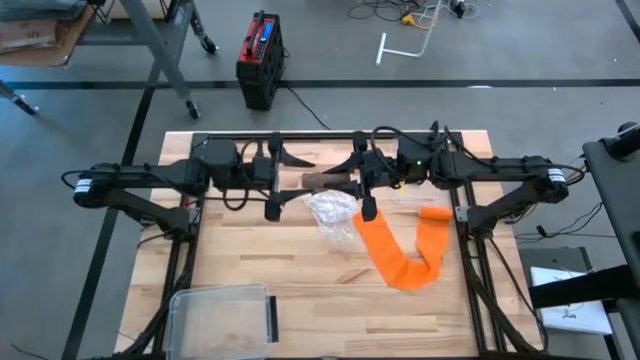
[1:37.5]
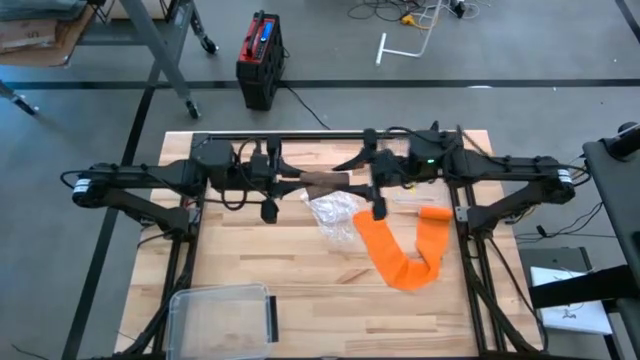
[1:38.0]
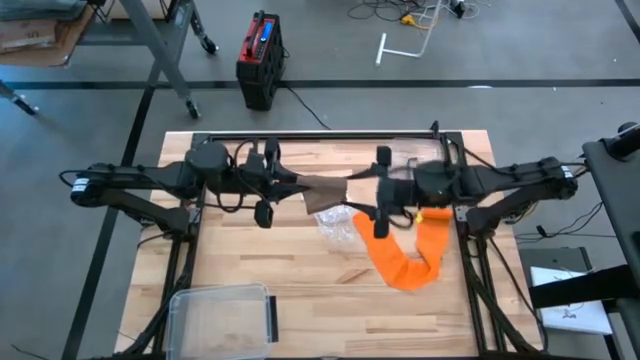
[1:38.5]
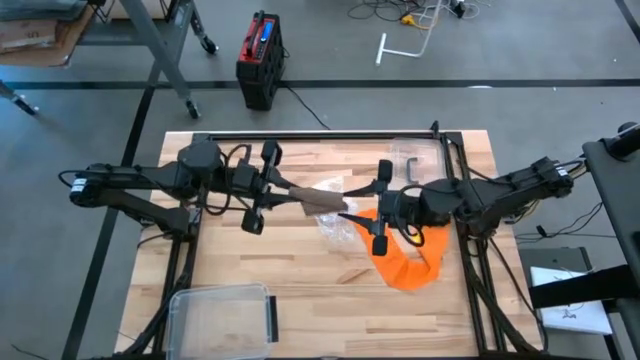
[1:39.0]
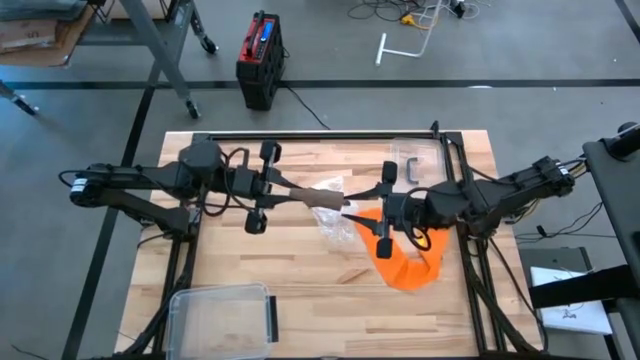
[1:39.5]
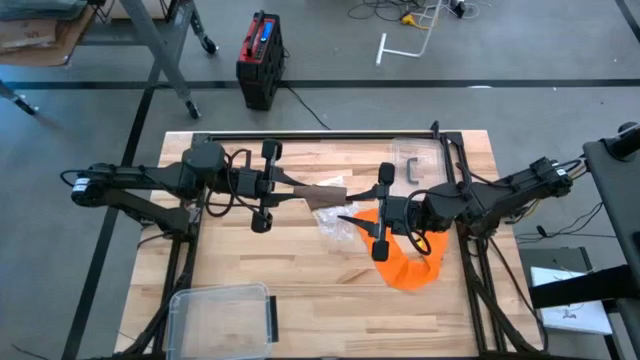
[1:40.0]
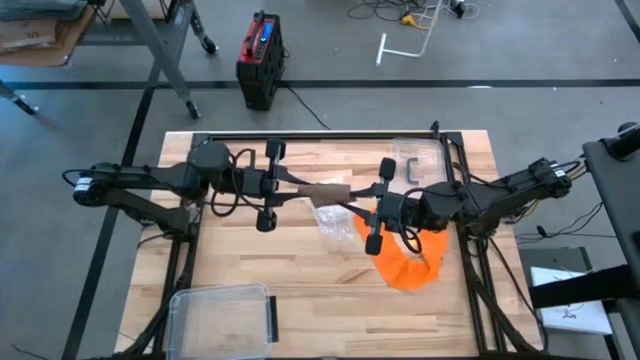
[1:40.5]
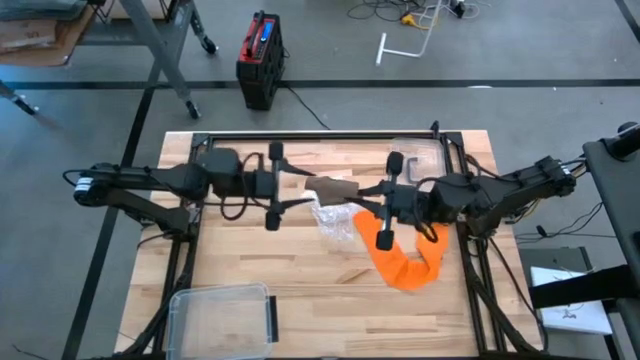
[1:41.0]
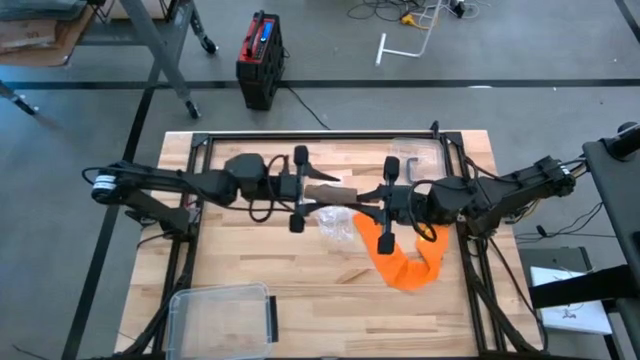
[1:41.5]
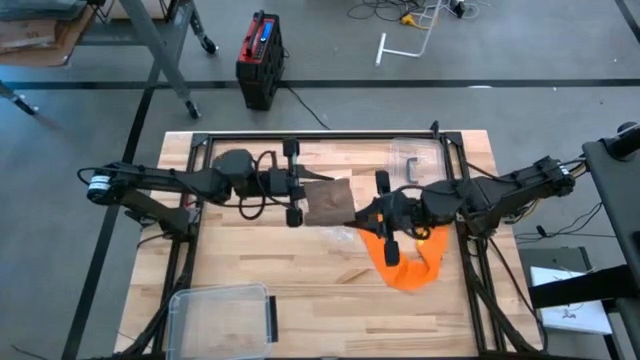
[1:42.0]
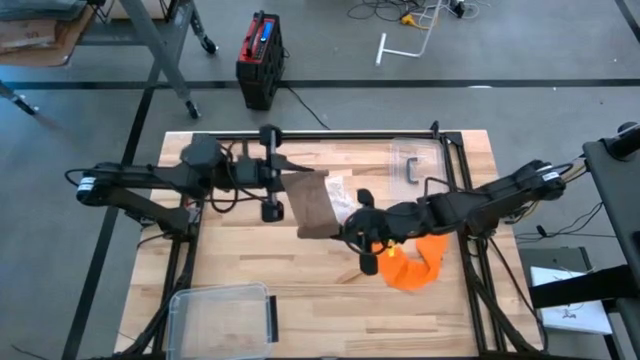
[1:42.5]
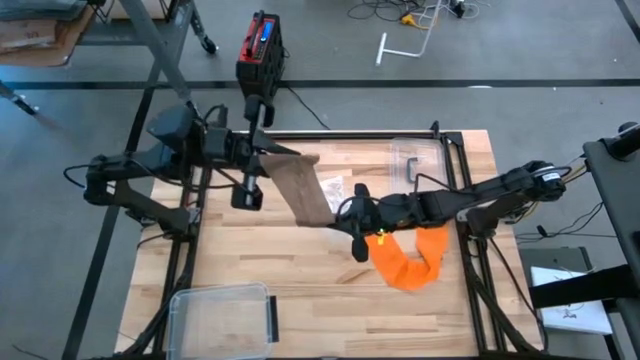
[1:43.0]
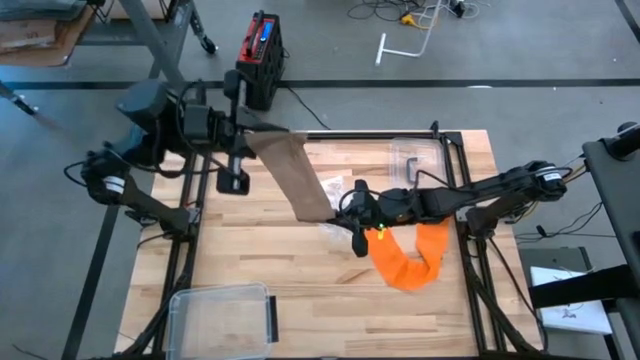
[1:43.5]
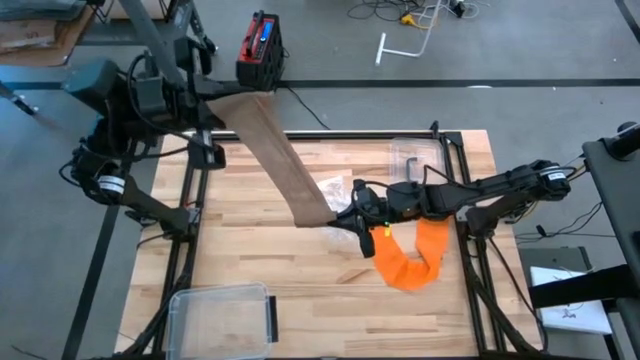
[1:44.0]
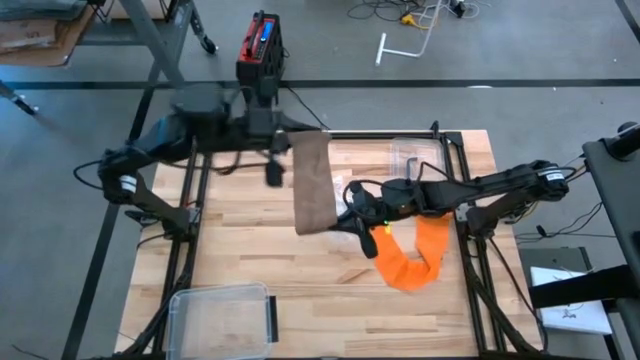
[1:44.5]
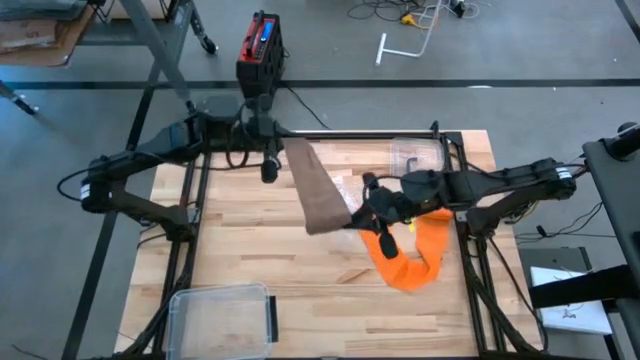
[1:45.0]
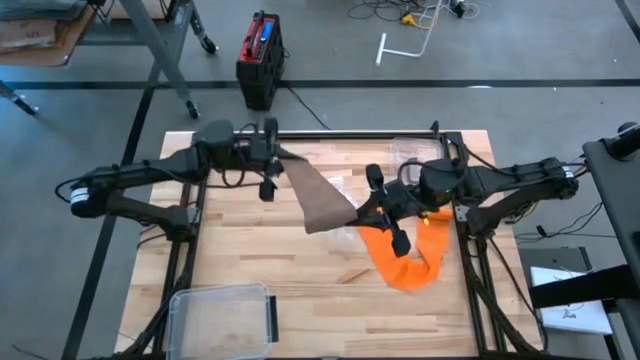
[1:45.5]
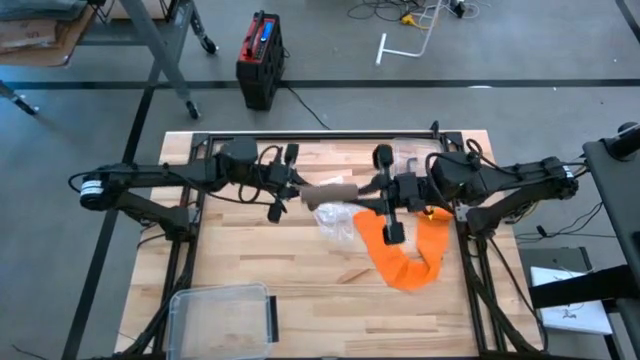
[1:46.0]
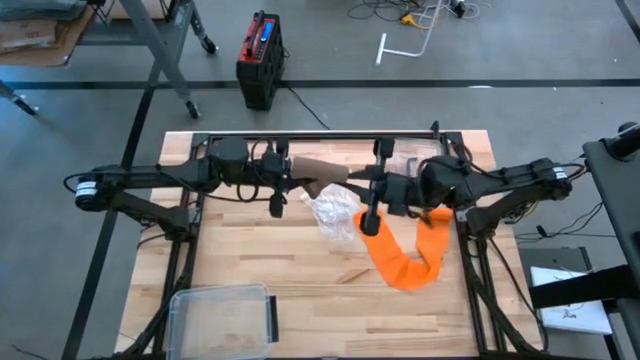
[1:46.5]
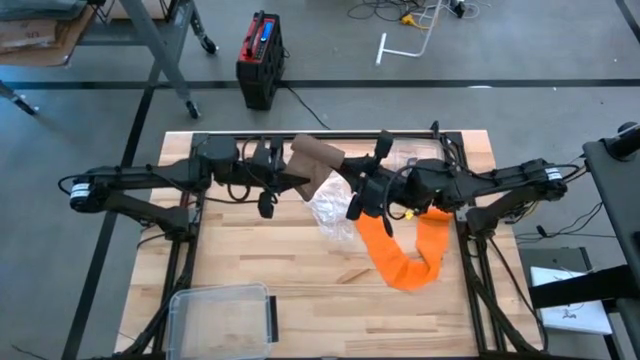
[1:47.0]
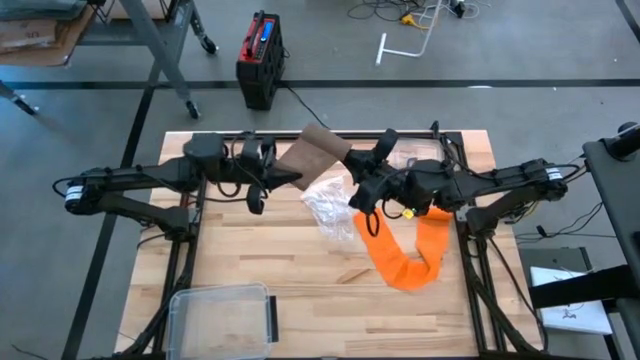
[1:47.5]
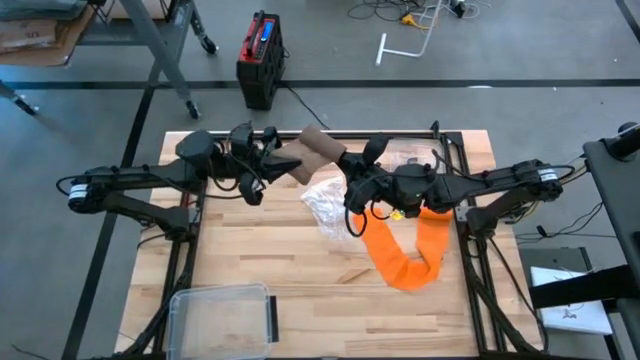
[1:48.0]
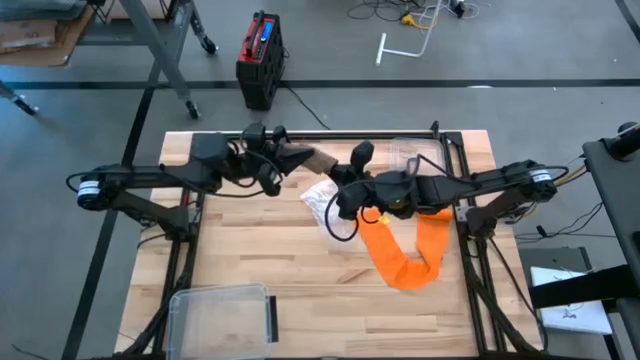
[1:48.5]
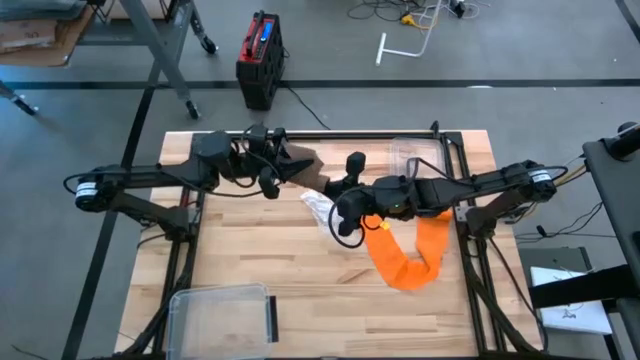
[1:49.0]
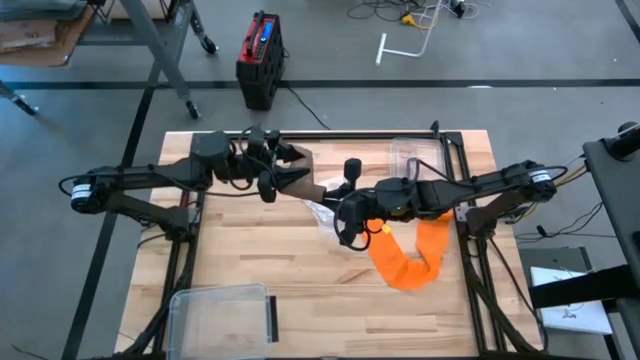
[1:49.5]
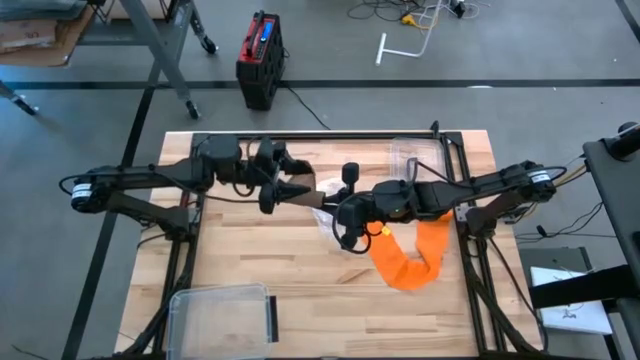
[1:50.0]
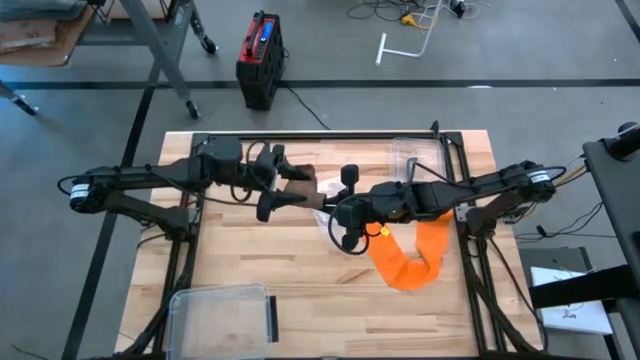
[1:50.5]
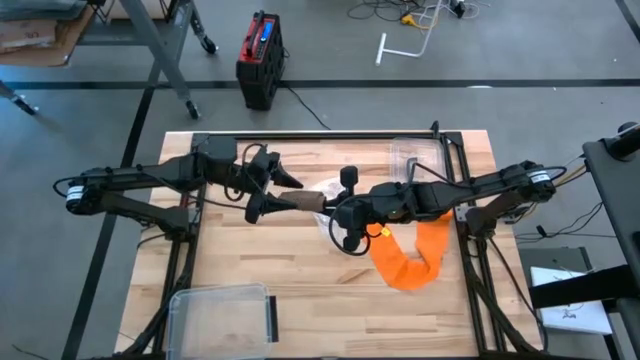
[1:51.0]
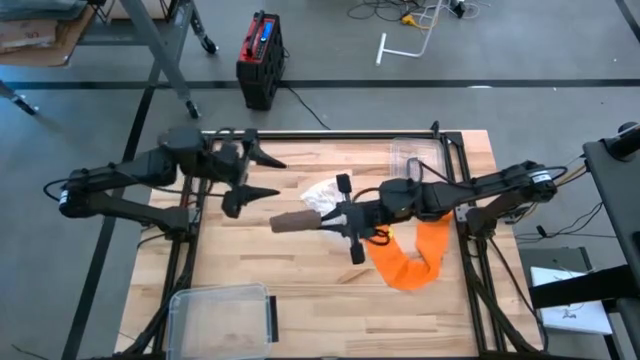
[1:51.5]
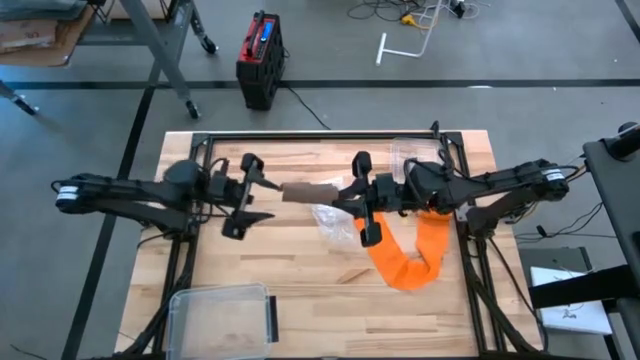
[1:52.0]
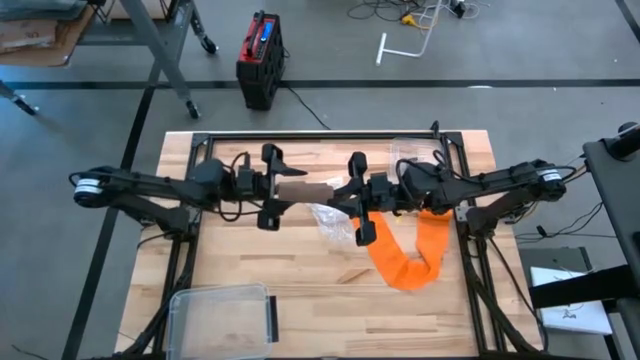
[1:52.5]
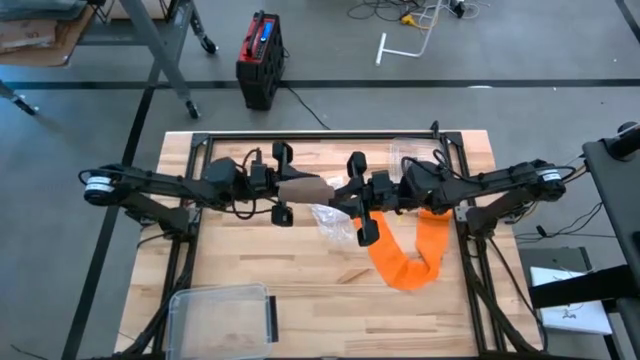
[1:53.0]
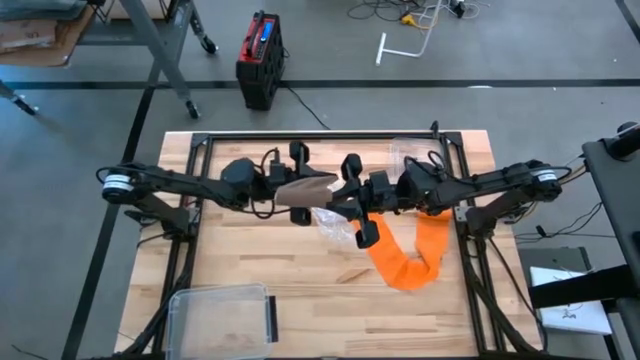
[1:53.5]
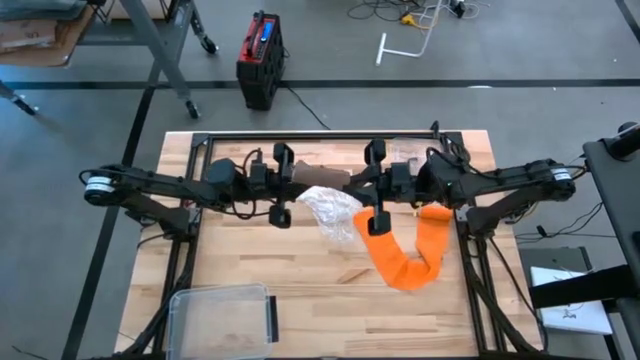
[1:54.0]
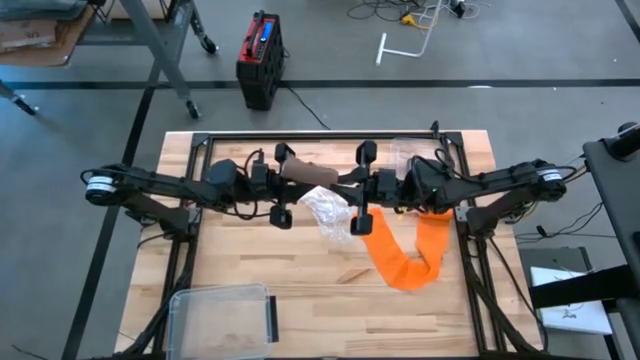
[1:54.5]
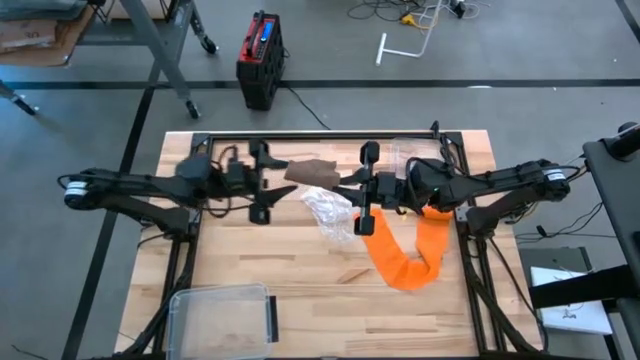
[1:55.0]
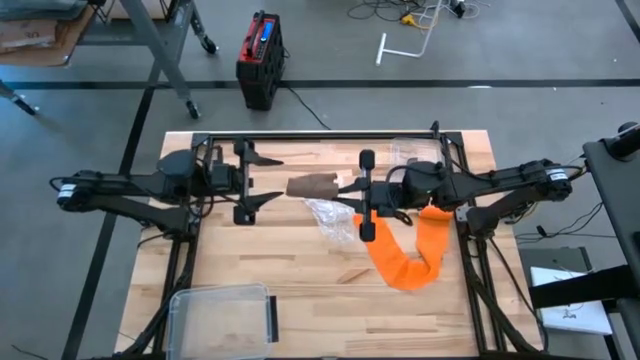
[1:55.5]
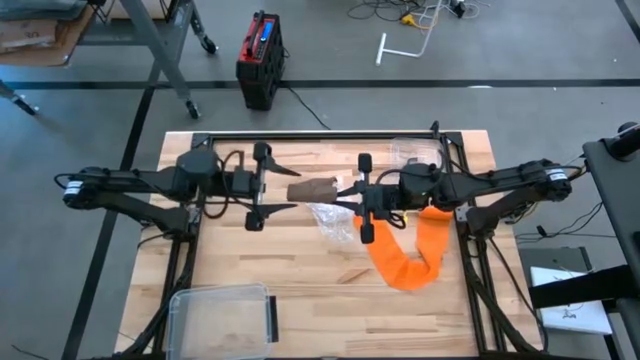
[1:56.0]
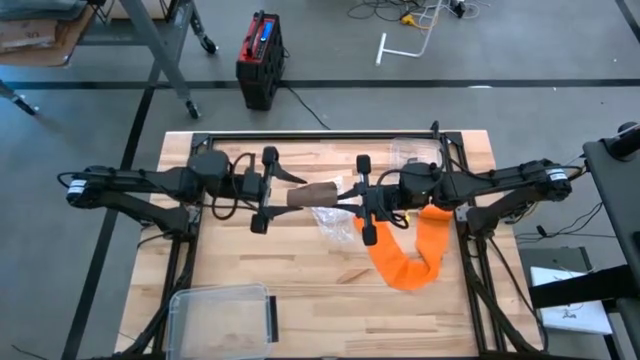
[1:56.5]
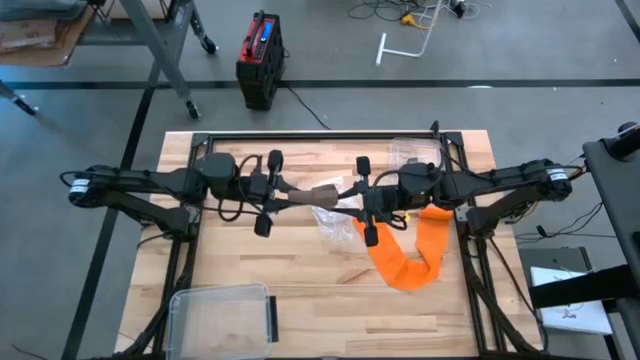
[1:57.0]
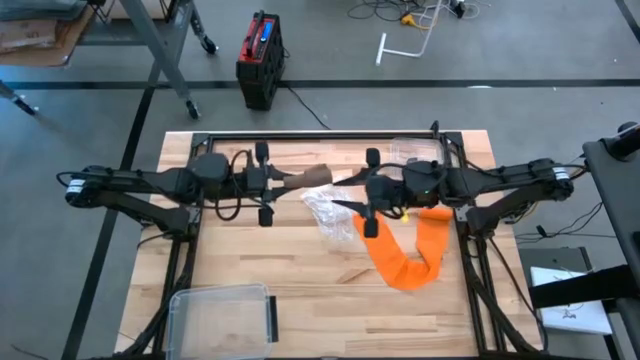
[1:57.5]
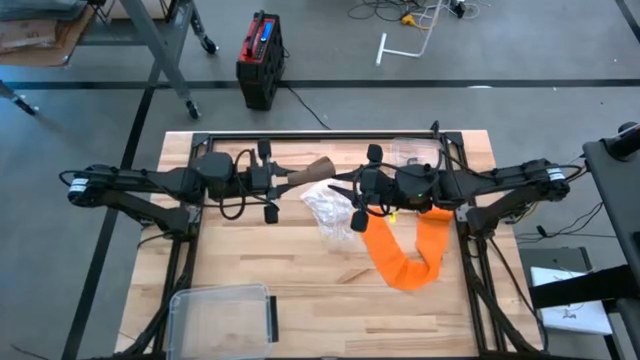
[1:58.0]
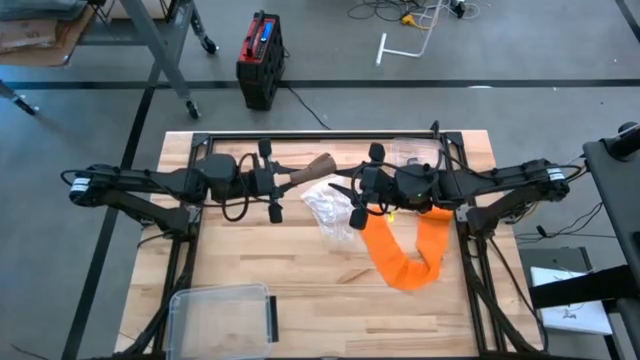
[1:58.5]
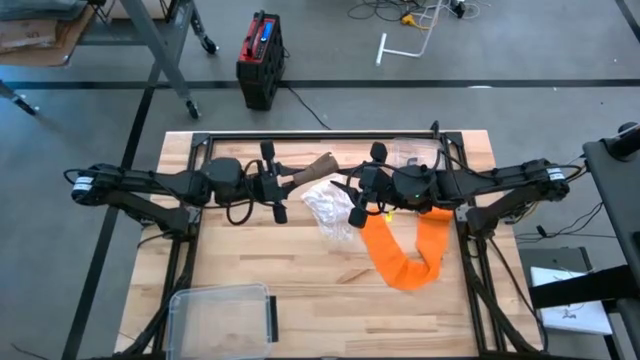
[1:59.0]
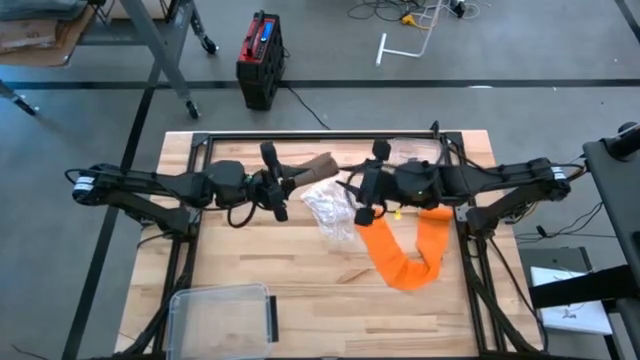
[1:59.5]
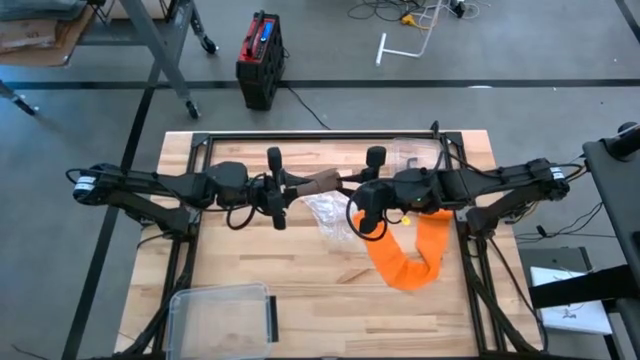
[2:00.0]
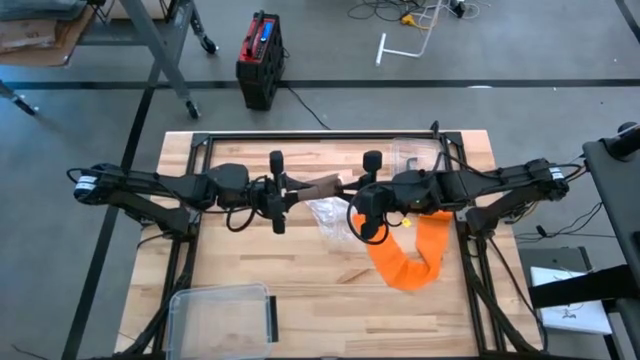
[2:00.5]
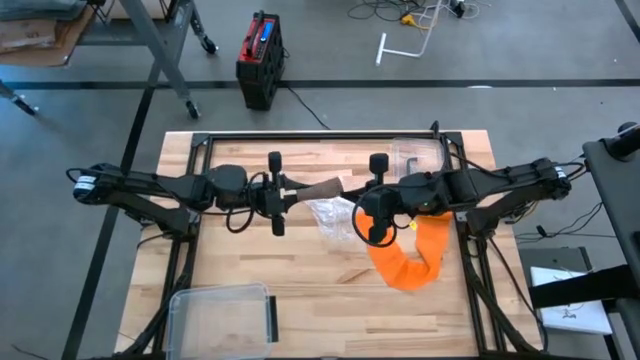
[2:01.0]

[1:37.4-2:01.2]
Task: Roll bandage
Roll the brown bandage
